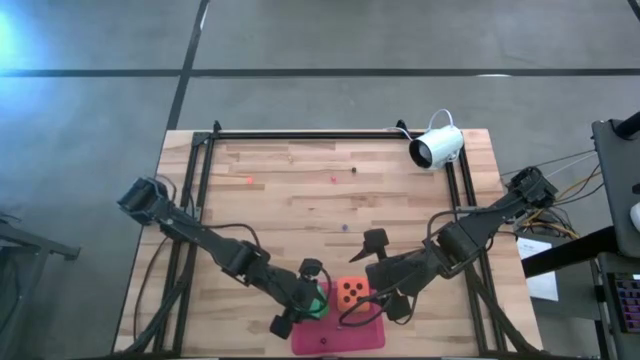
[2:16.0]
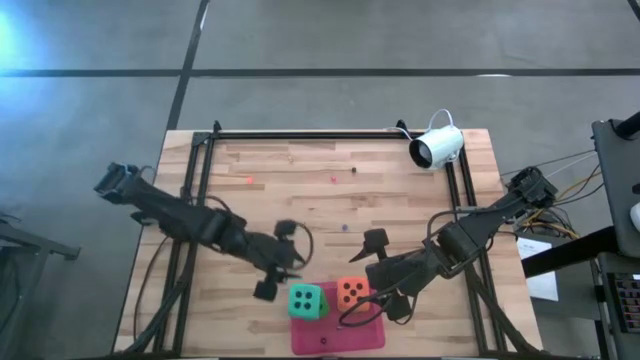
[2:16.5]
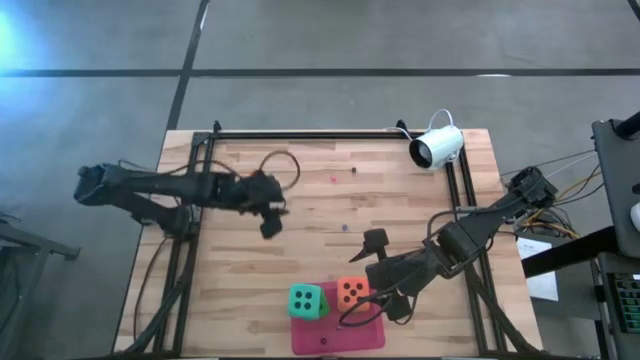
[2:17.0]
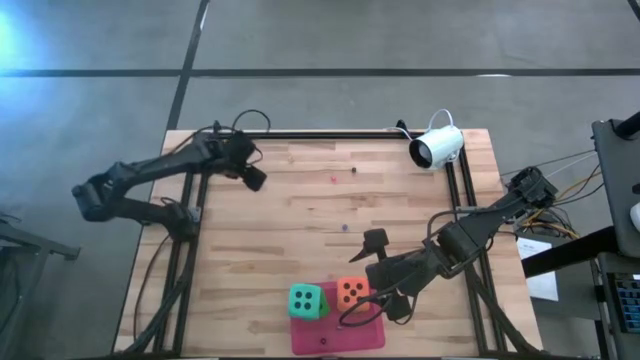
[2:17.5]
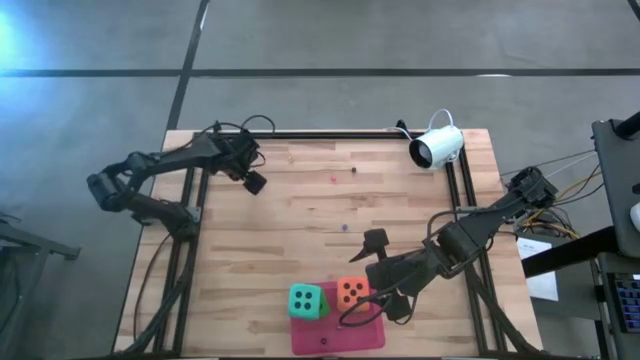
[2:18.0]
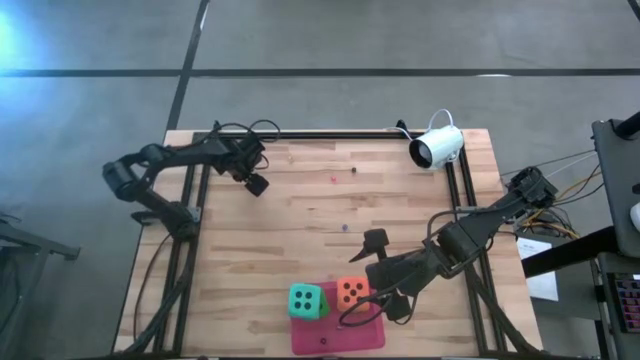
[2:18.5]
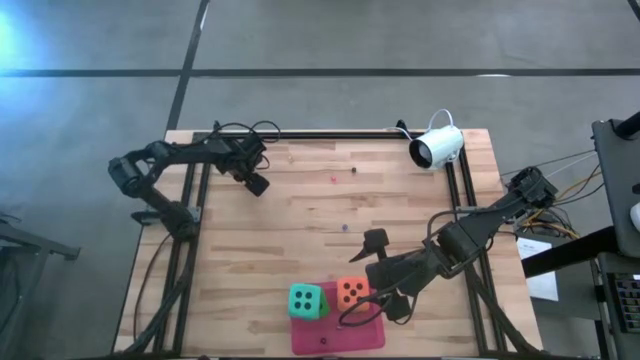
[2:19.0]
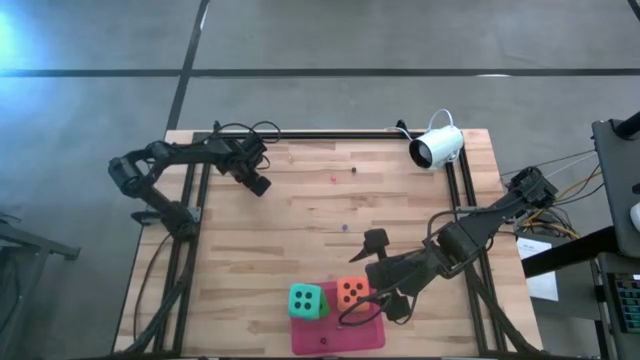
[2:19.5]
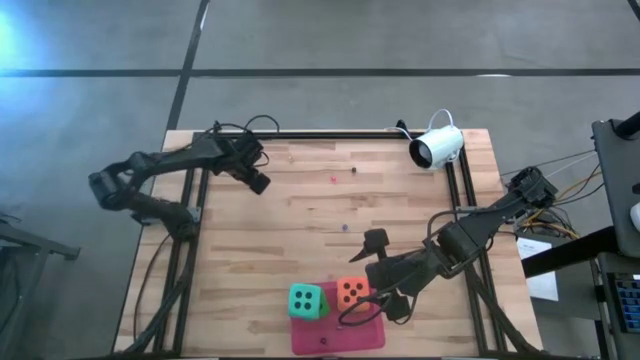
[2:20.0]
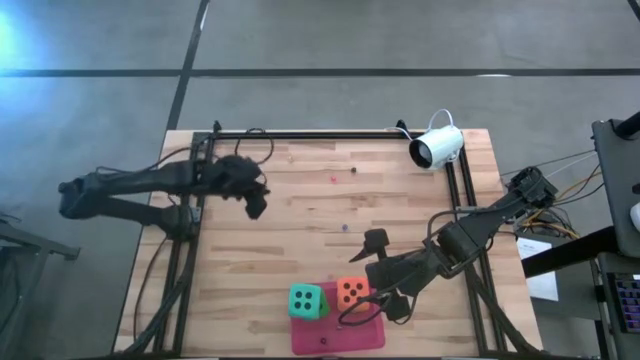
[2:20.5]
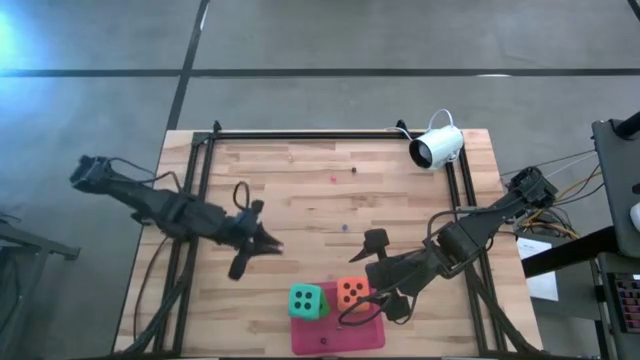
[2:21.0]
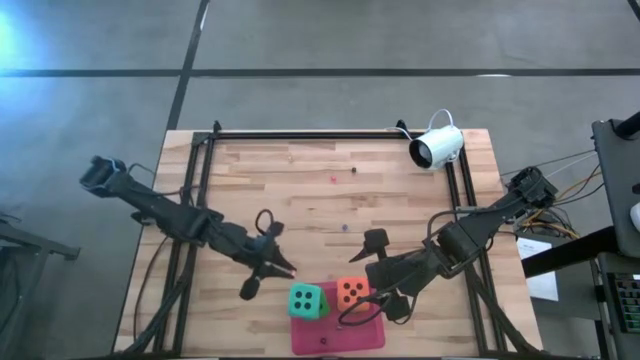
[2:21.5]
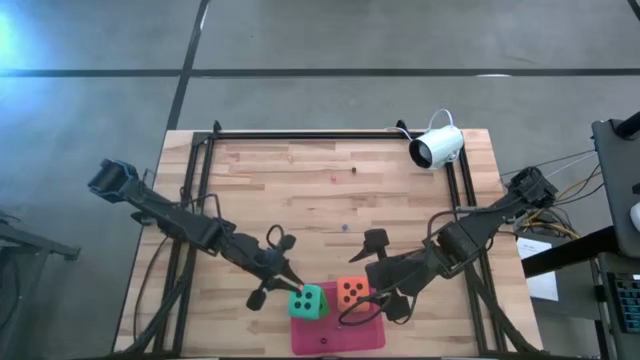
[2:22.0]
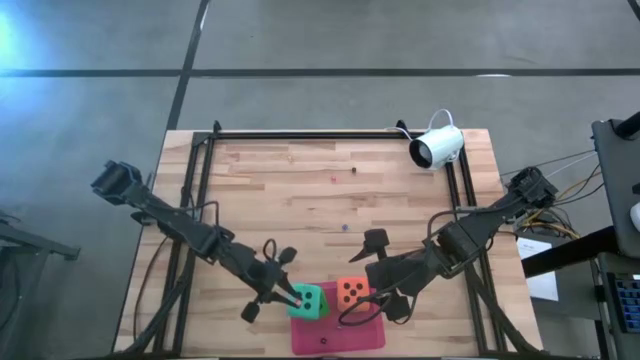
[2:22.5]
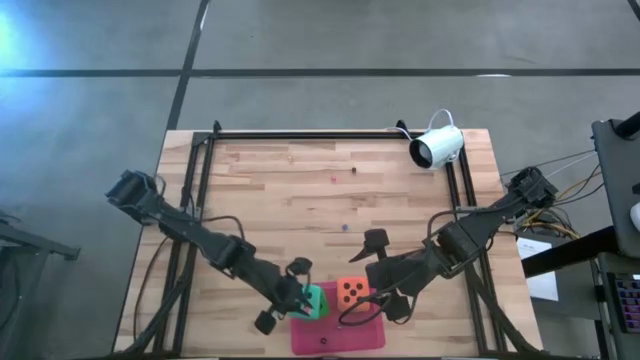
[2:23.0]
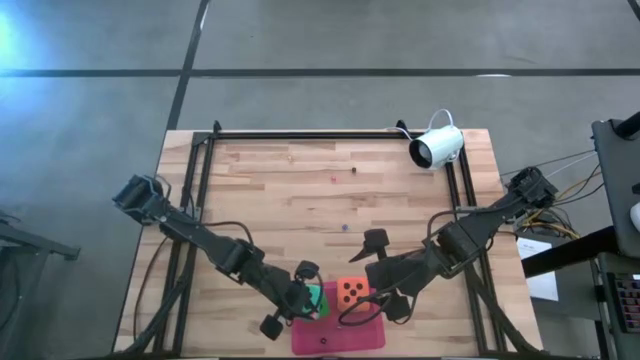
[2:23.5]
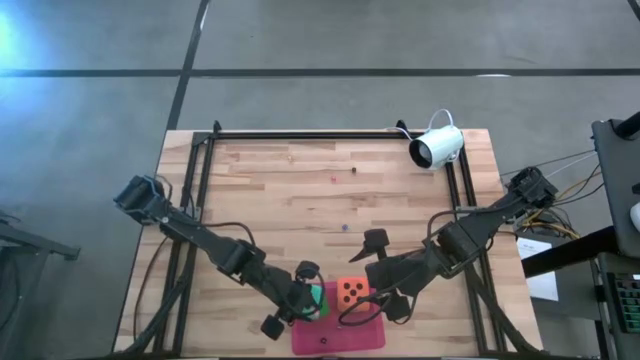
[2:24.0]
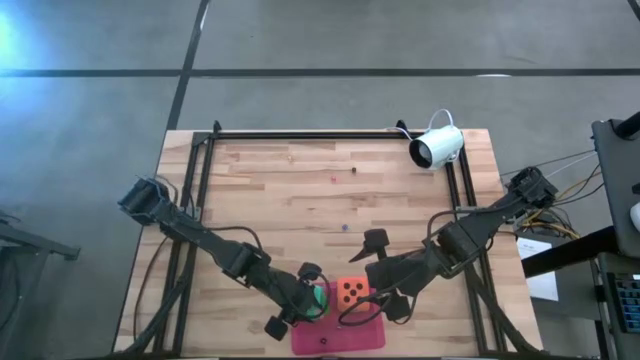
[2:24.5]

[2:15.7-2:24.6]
Task: Pick & Place Dice
Put the small orange dice into the pink bin

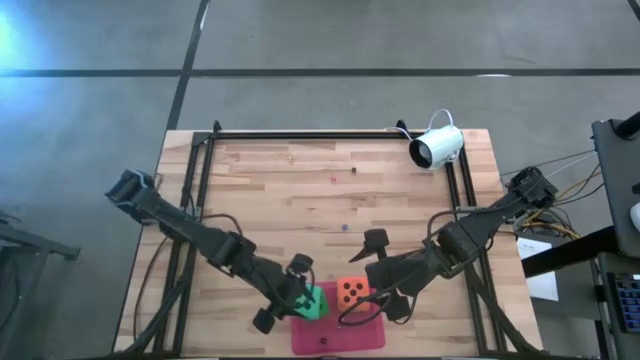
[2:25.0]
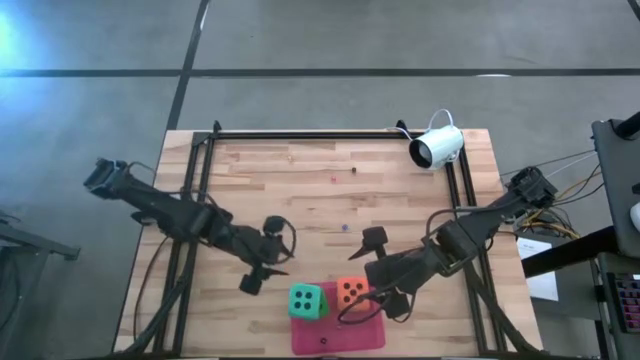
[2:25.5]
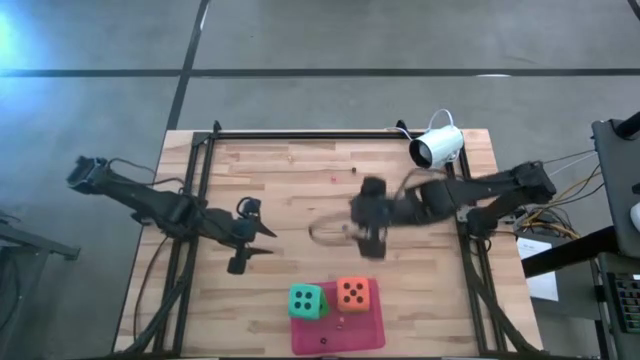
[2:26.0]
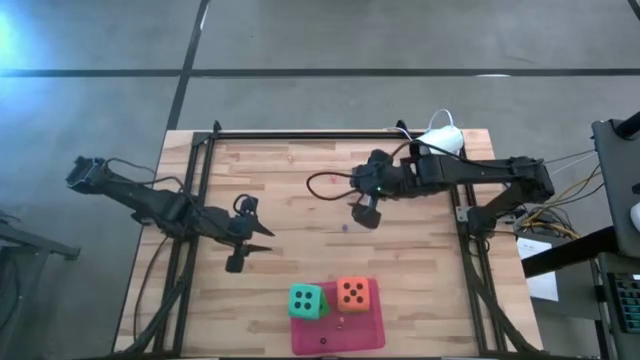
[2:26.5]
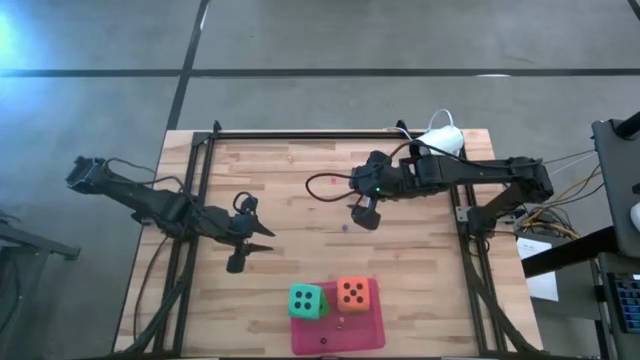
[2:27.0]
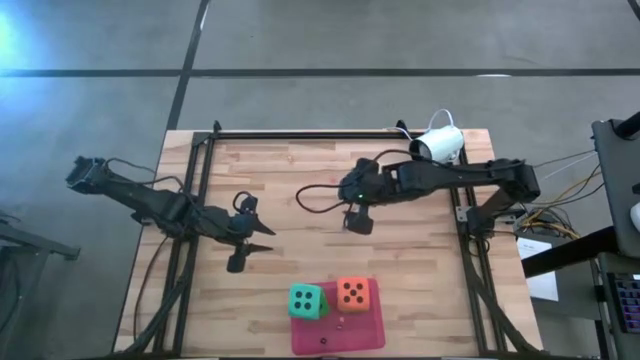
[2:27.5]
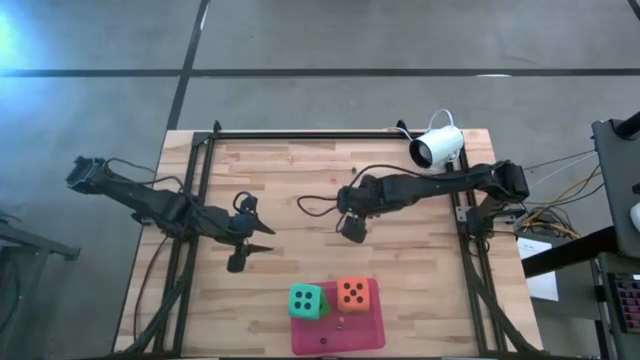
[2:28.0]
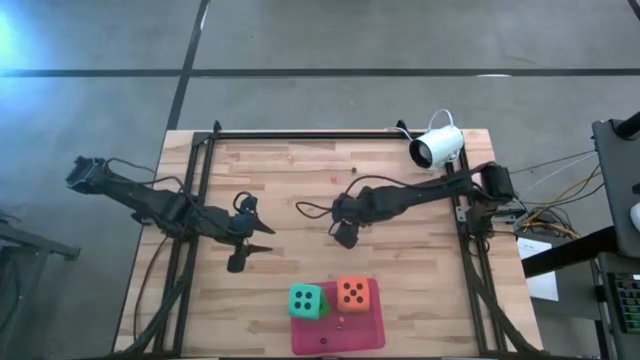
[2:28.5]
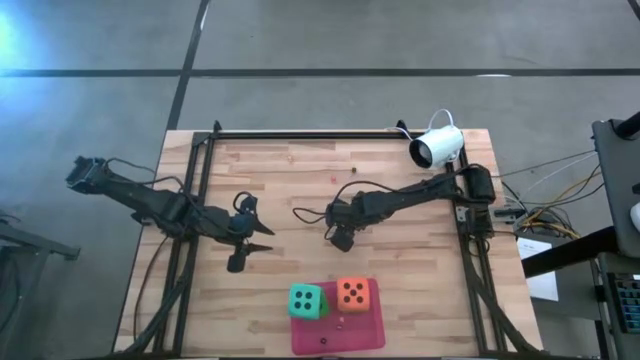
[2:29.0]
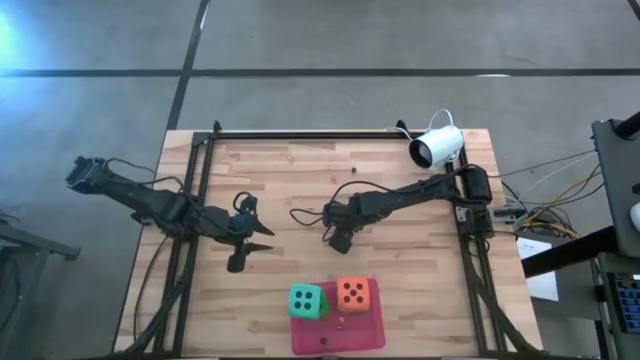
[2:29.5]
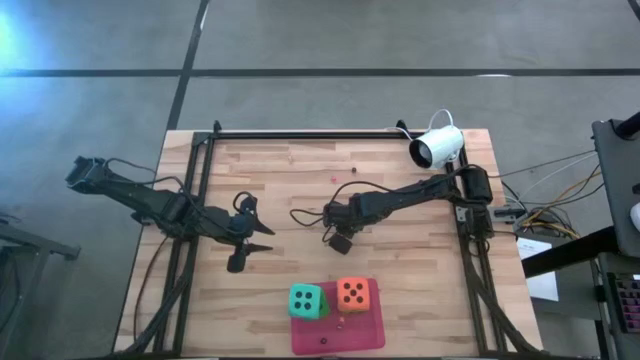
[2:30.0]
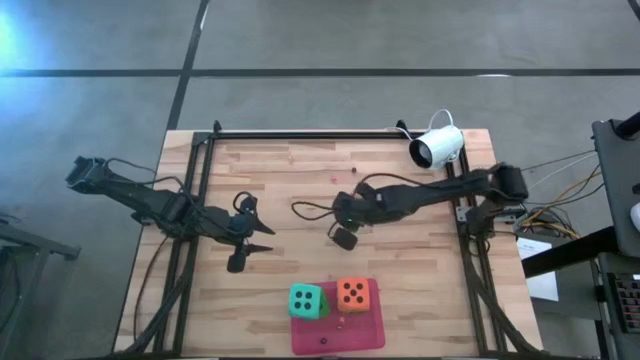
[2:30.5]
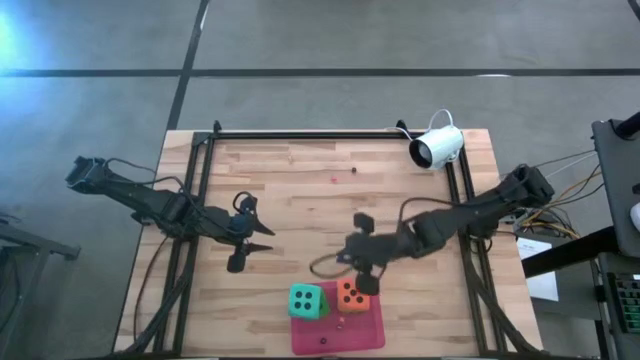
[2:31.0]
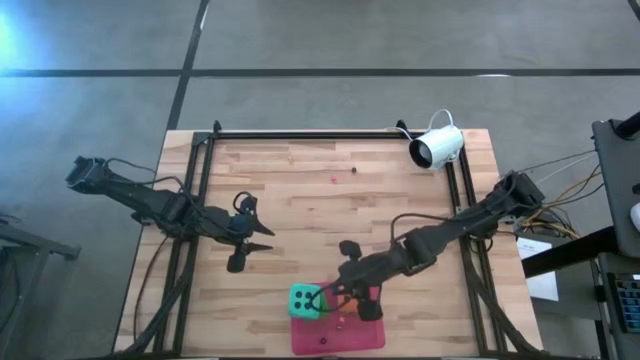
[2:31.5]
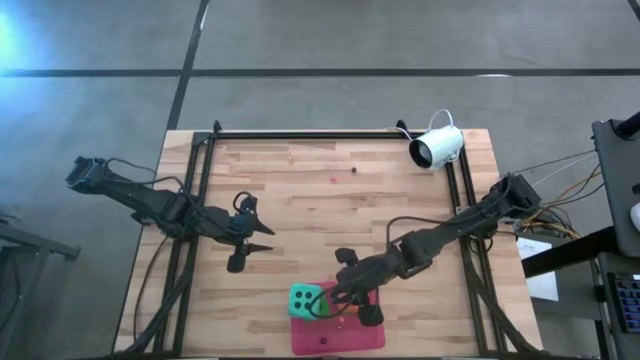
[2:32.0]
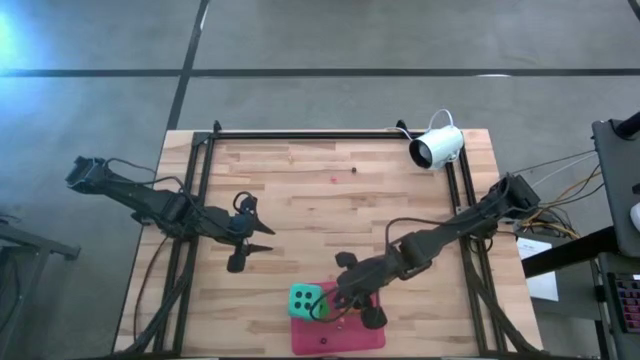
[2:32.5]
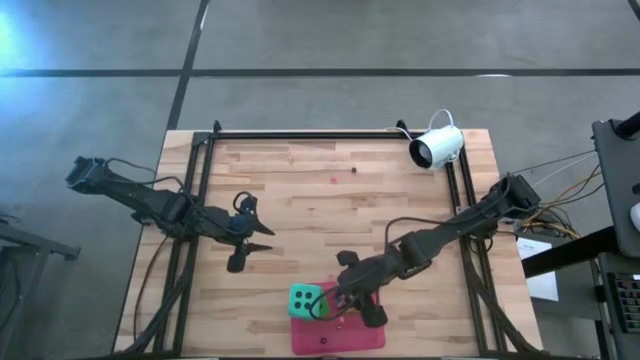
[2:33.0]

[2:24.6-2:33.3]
Put the blue dice into the pink bin

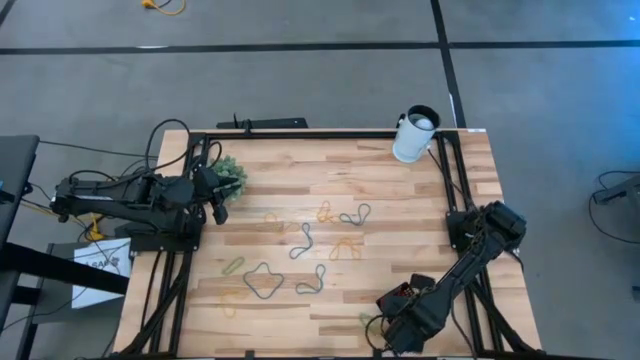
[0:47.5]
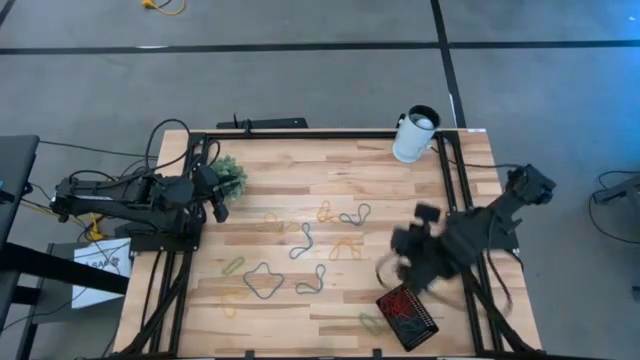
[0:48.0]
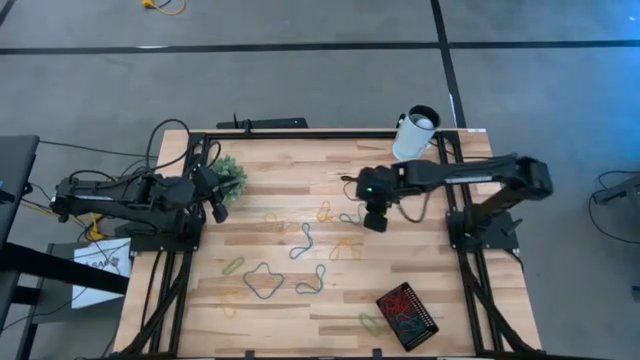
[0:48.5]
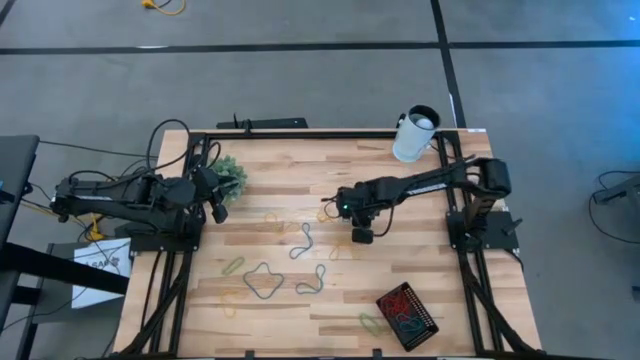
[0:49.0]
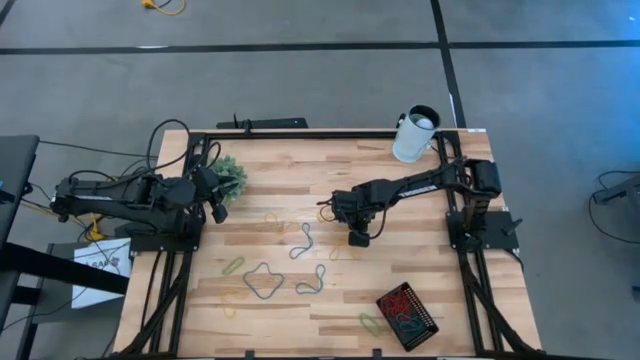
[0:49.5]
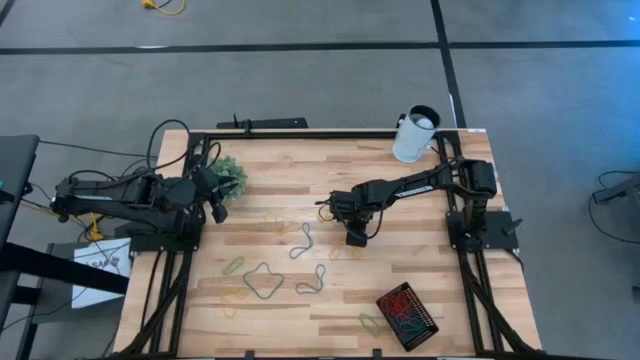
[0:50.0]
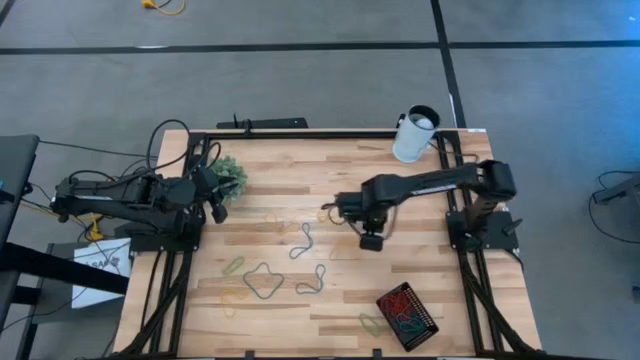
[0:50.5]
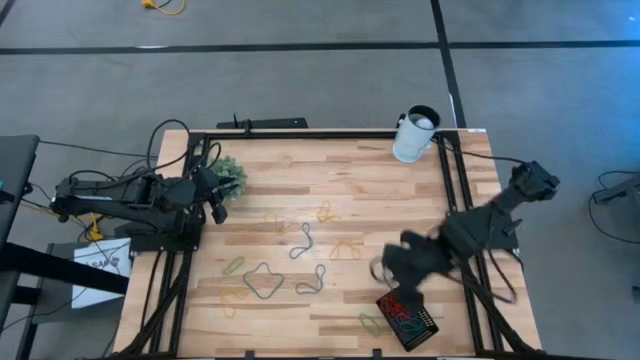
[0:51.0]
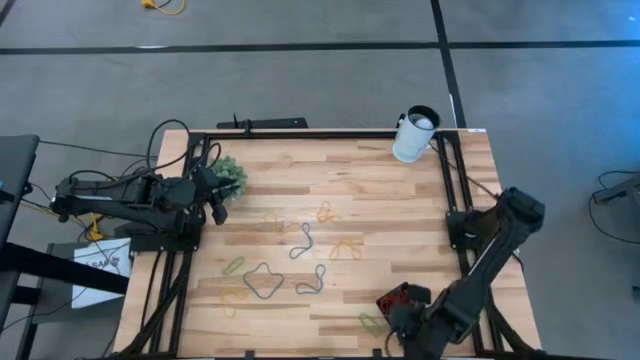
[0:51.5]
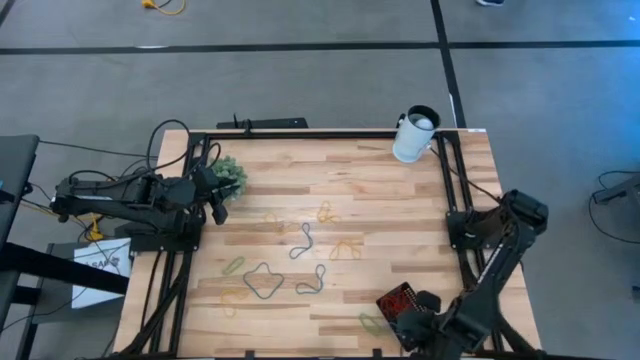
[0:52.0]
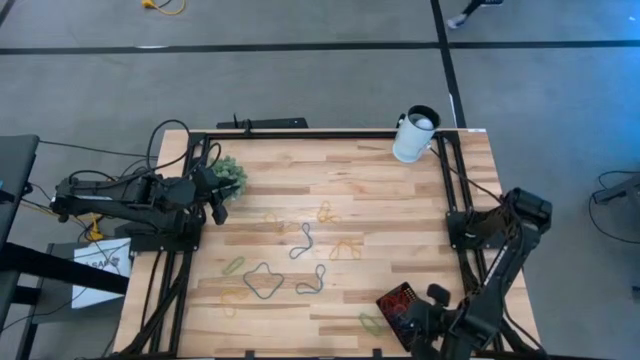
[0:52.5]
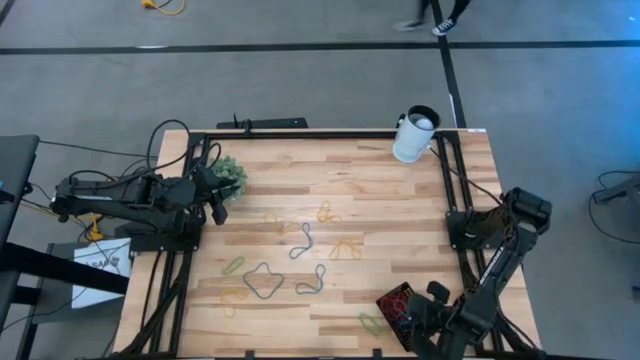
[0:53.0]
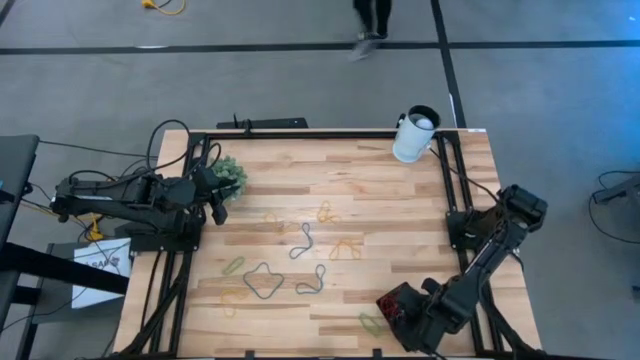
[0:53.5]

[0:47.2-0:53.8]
Task: Pick and place rubber bands into bin
Put the blue rubber band into the black basket
